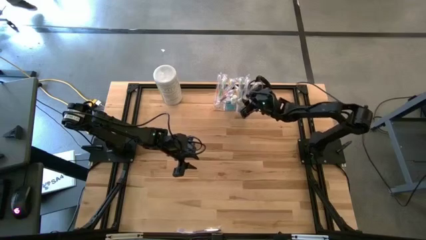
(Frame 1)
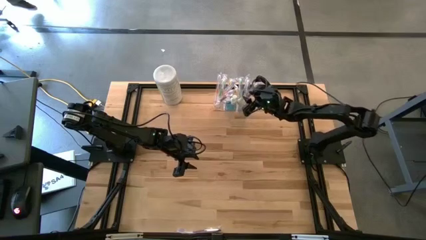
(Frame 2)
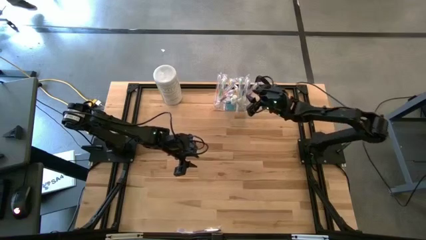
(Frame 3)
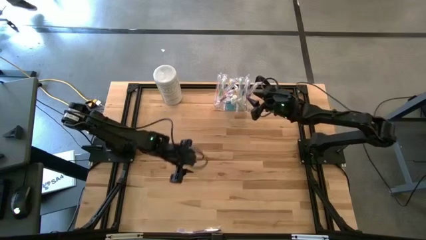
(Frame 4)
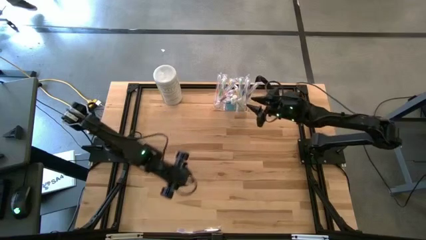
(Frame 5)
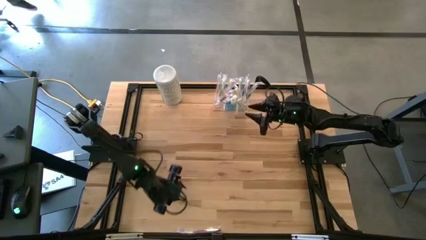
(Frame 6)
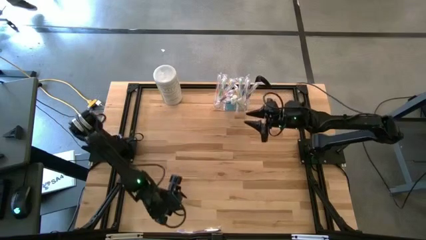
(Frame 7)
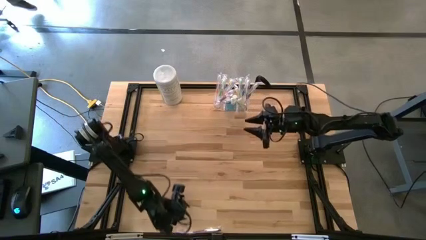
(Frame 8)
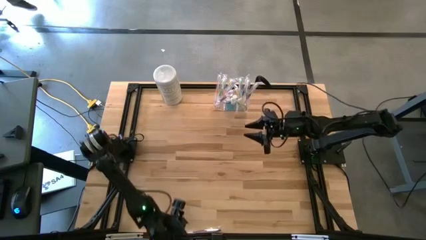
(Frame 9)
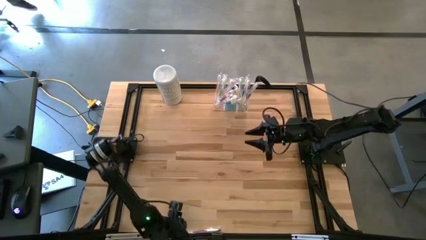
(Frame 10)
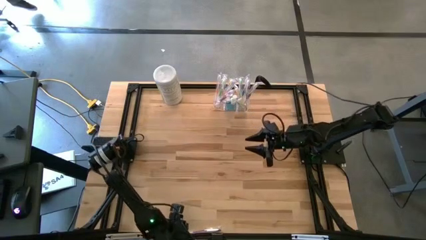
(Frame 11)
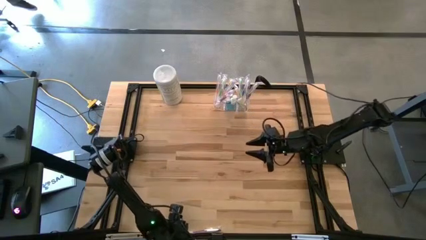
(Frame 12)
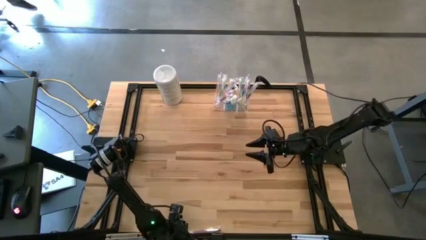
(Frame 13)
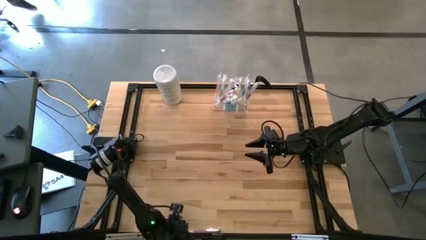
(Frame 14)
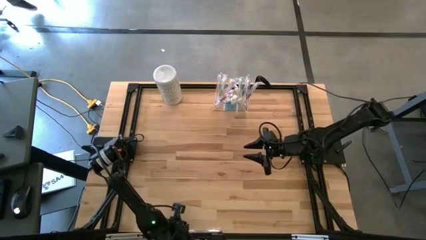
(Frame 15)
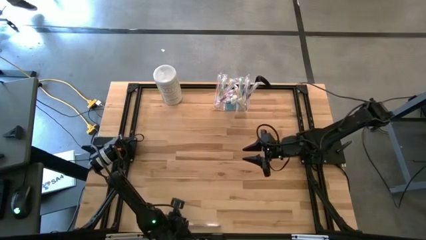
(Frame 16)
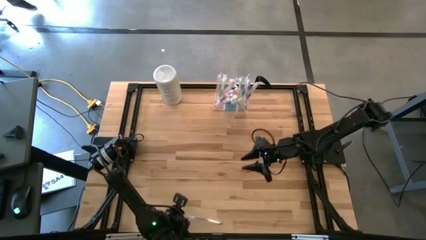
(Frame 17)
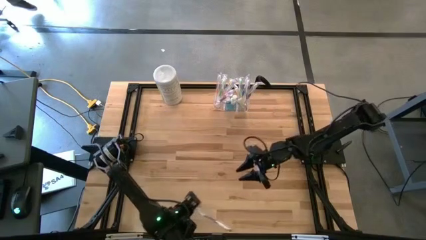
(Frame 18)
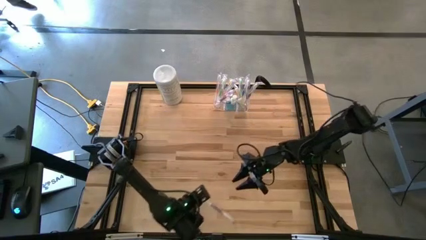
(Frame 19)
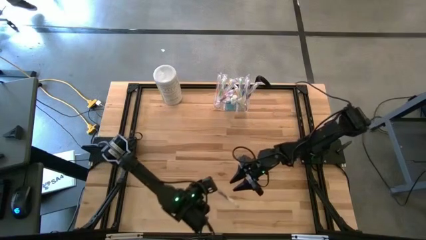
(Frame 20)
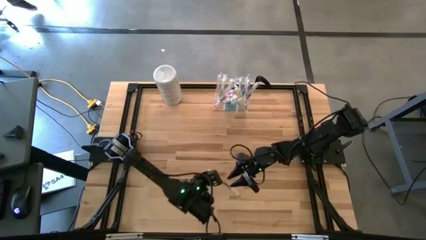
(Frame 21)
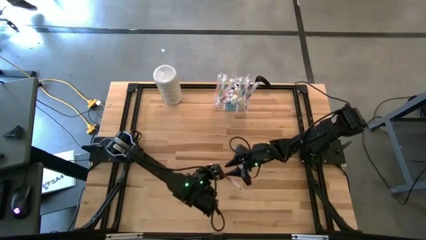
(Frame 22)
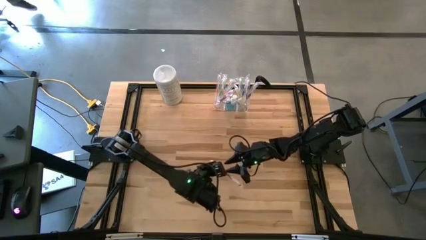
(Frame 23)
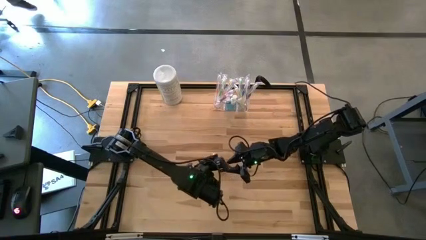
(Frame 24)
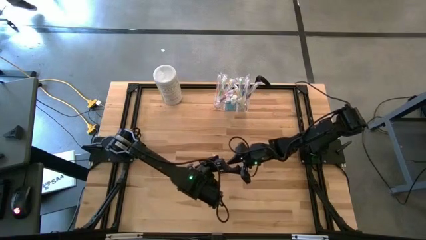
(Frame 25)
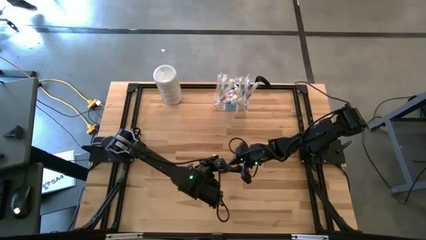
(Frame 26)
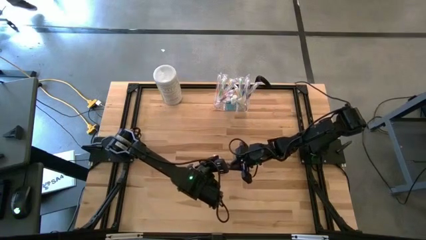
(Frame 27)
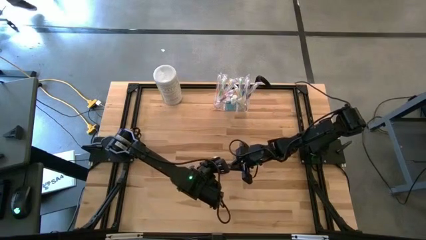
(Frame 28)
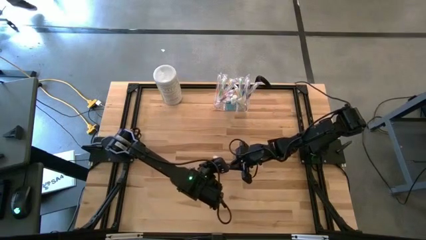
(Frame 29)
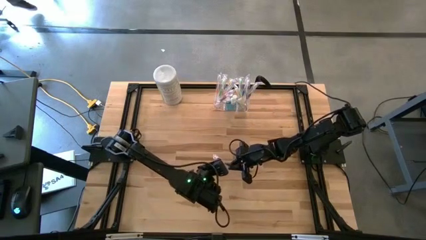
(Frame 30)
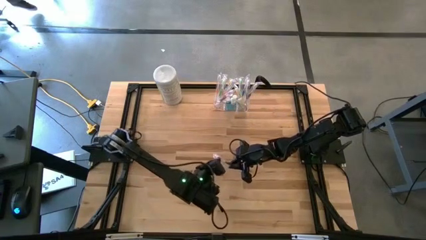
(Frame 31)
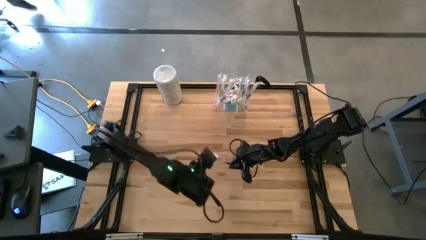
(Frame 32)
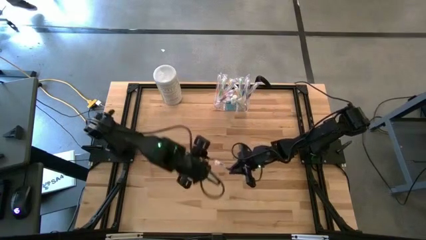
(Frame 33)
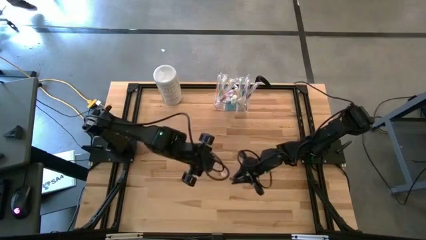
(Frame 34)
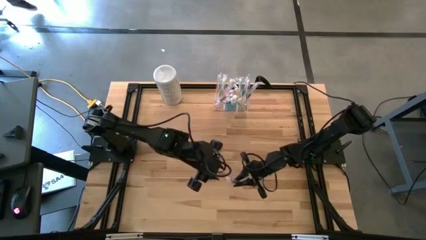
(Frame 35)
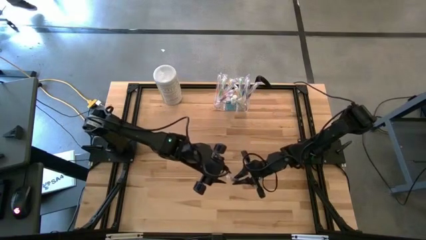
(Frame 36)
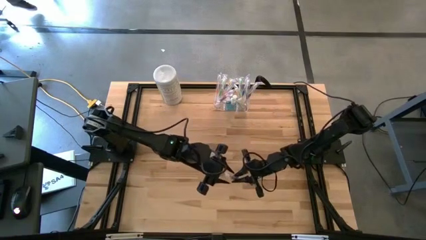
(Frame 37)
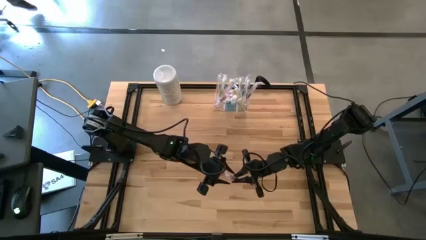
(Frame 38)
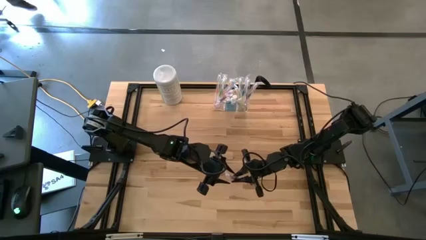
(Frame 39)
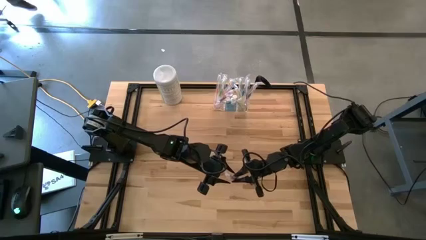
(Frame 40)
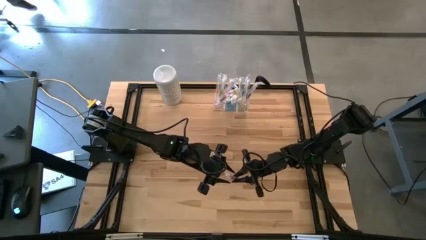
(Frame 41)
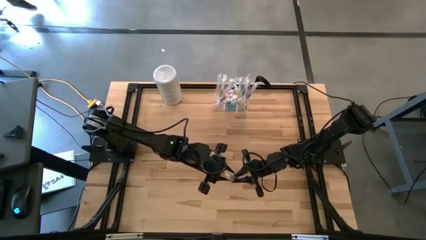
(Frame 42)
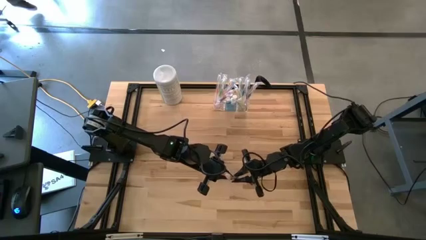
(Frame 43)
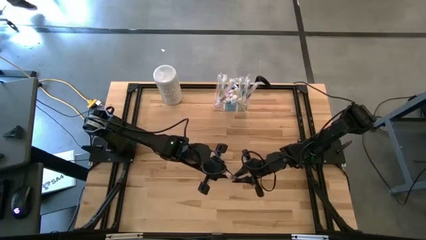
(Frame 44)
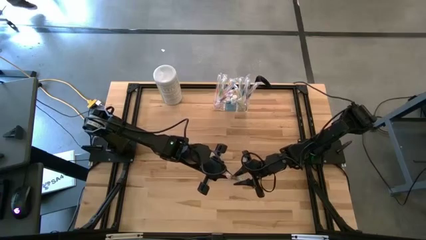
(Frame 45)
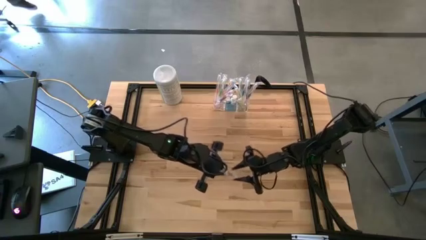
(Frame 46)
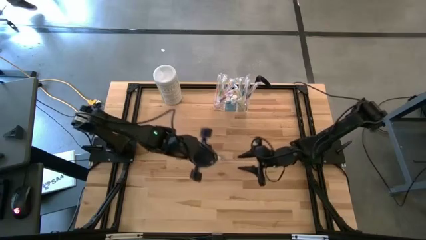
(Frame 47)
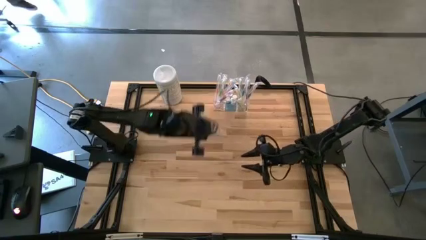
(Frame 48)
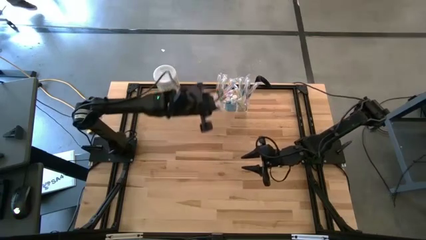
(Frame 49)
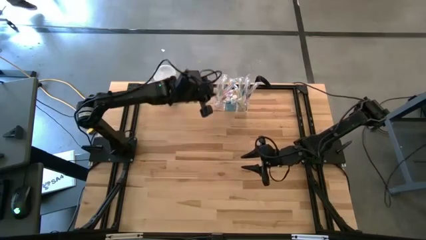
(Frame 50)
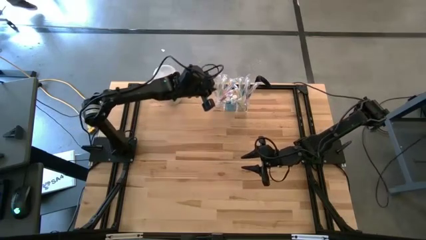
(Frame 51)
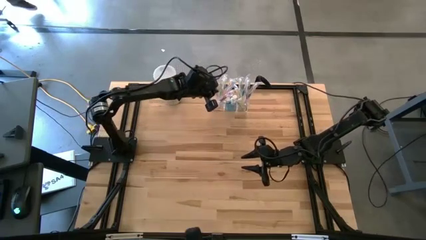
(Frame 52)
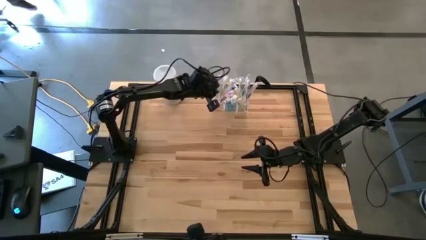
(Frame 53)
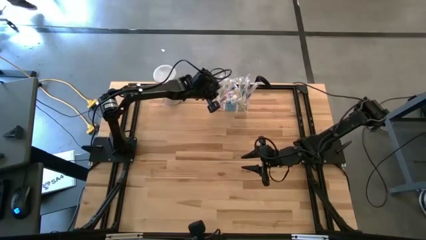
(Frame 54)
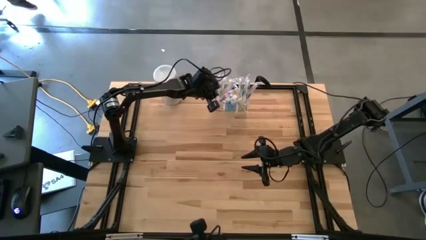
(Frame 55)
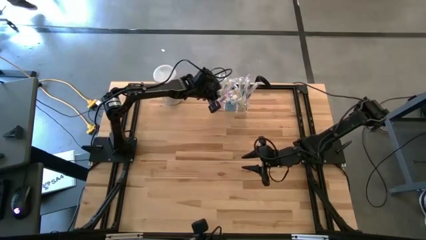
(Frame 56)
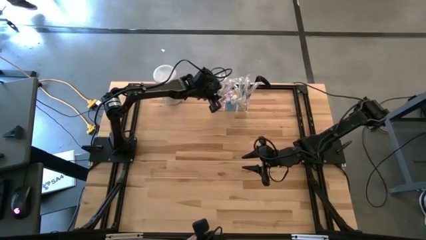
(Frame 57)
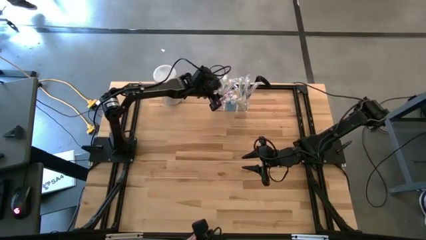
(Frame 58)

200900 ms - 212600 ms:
Task: Pick & Place toothbrushing station
Put the violet toothbrush into the transparent organizer

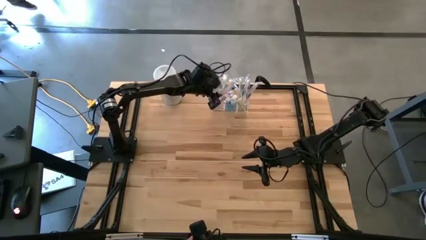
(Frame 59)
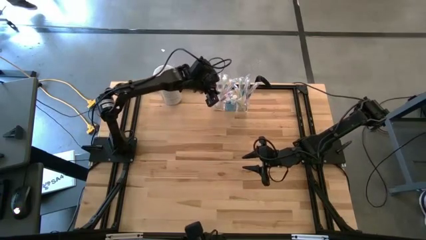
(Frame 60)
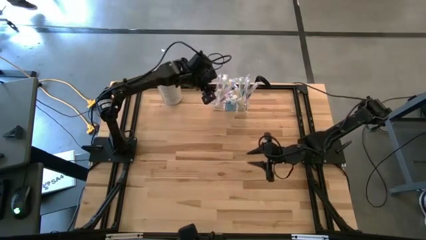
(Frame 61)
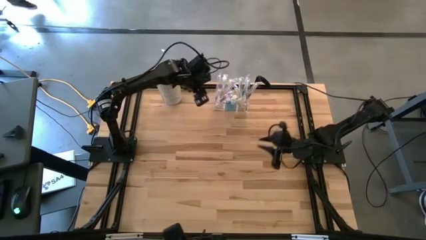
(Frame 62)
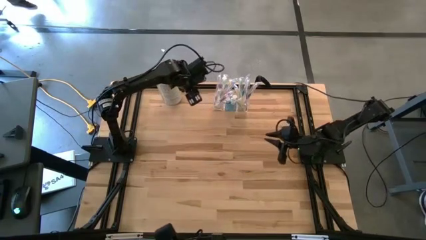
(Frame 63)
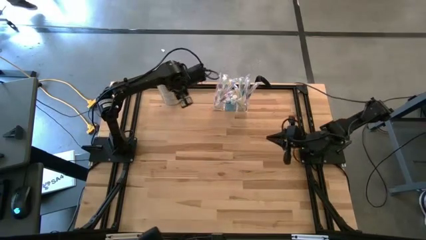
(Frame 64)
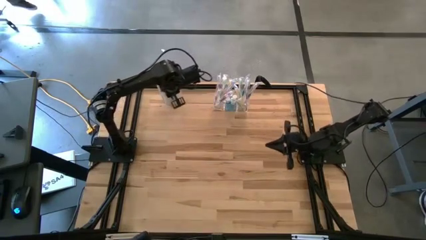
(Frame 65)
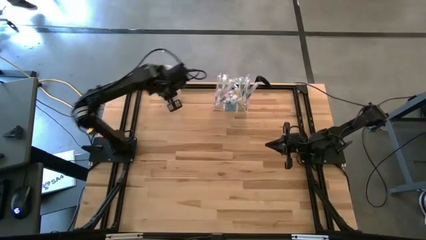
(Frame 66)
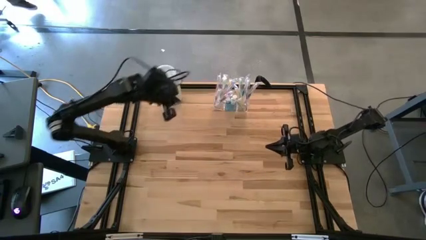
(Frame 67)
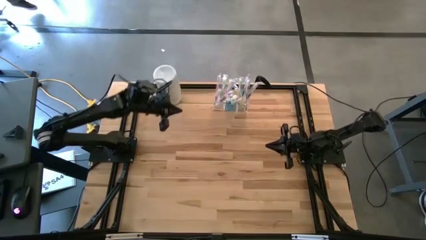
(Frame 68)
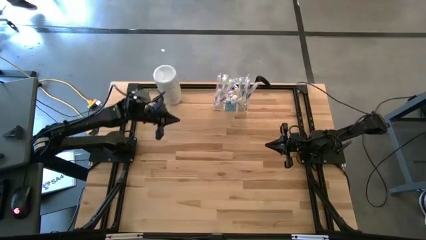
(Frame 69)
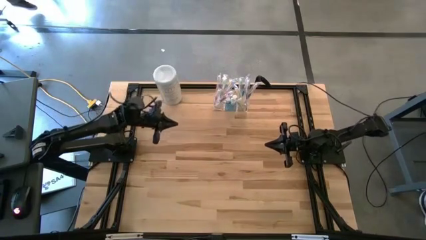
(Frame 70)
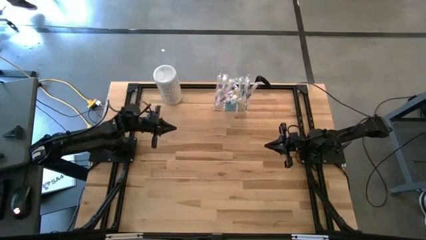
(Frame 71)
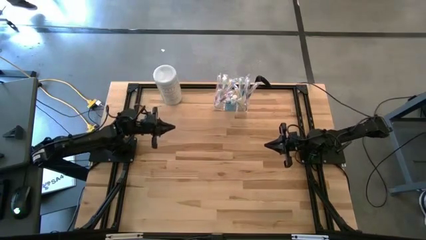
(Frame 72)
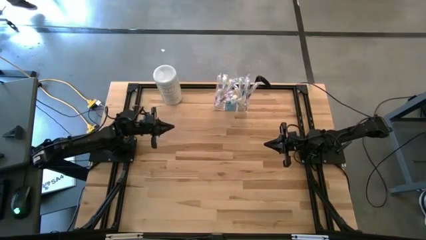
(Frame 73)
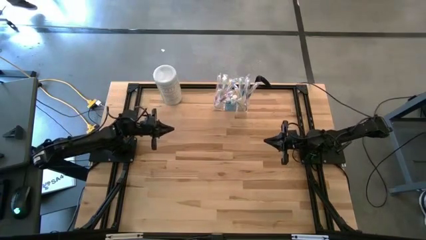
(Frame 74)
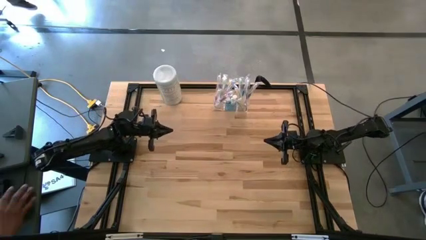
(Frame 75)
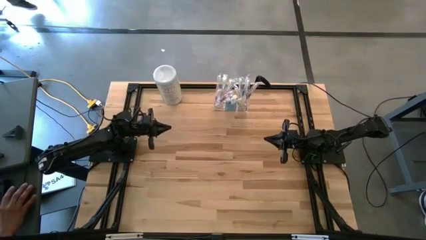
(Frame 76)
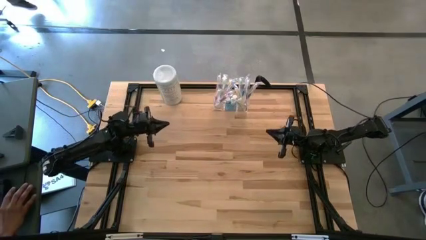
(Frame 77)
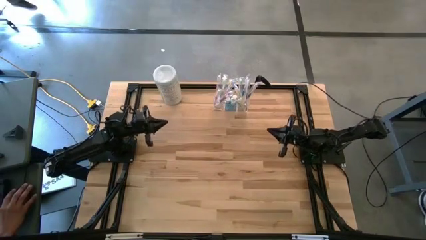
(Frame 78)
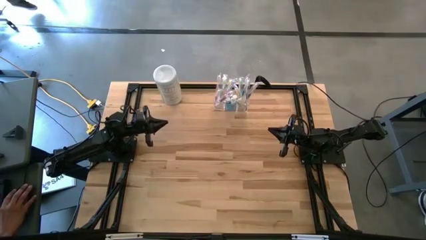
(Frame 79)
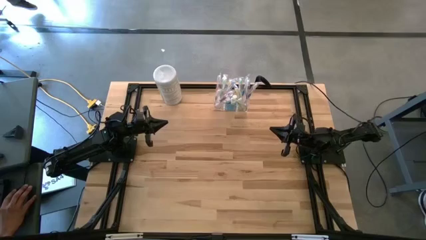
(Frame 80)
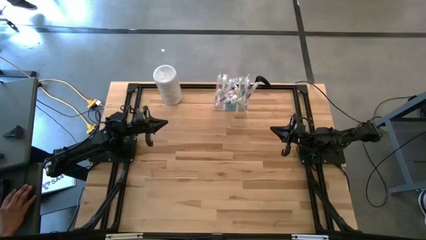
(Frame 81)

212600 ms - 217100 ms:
Return to Home Position
